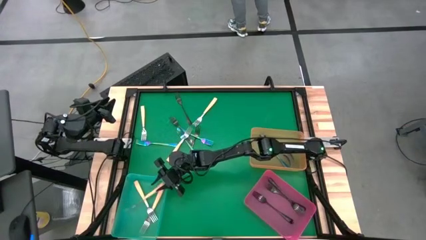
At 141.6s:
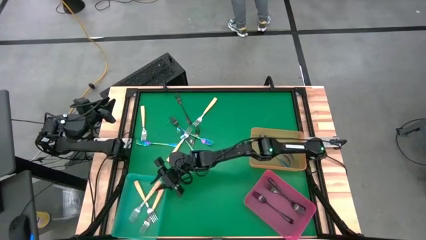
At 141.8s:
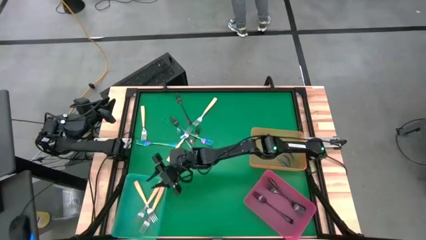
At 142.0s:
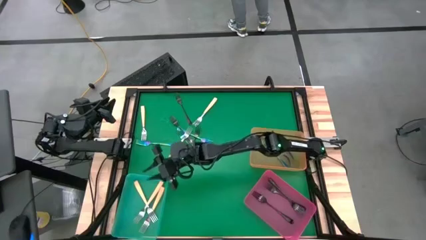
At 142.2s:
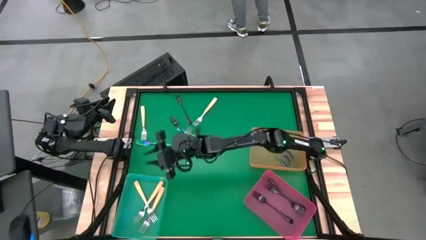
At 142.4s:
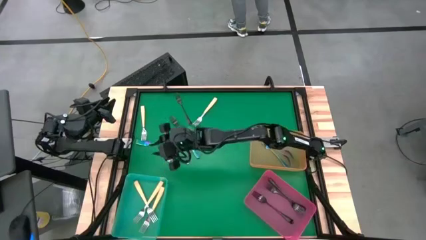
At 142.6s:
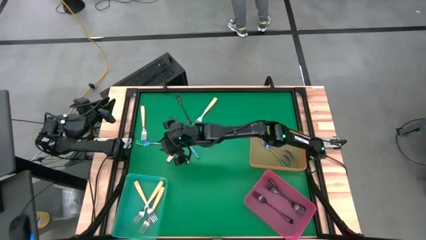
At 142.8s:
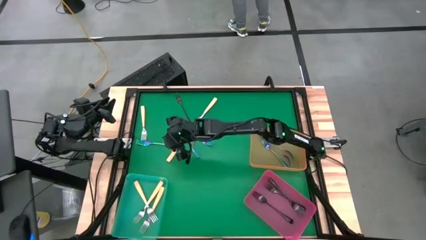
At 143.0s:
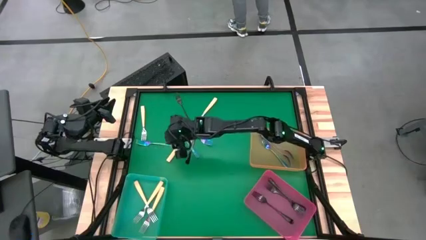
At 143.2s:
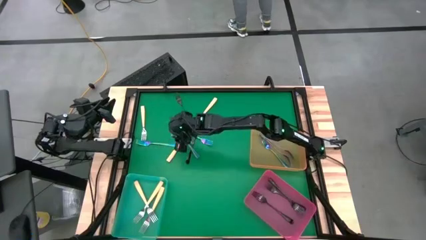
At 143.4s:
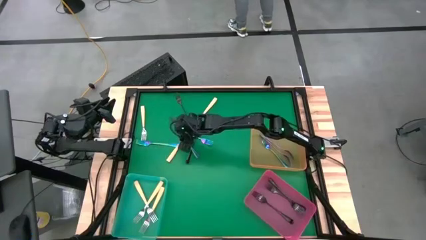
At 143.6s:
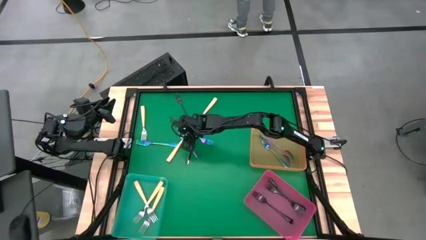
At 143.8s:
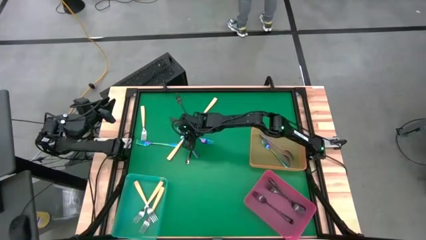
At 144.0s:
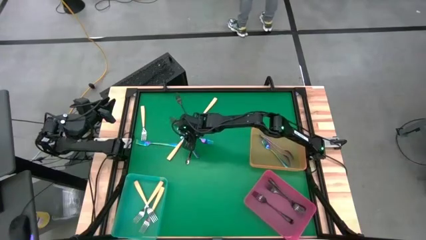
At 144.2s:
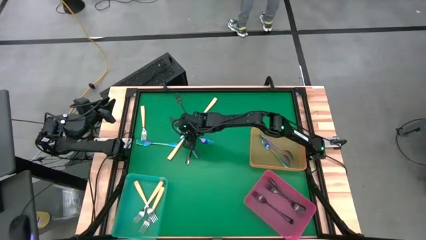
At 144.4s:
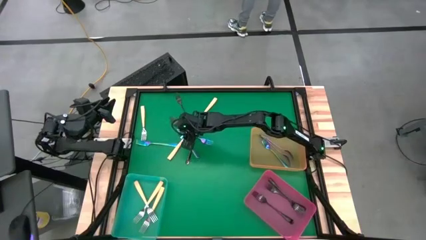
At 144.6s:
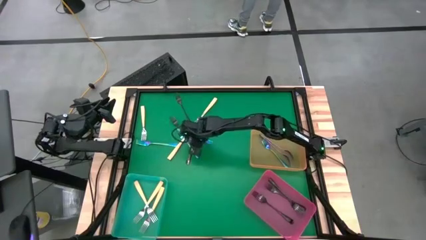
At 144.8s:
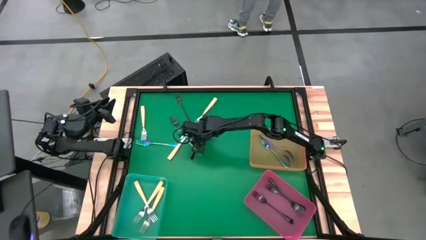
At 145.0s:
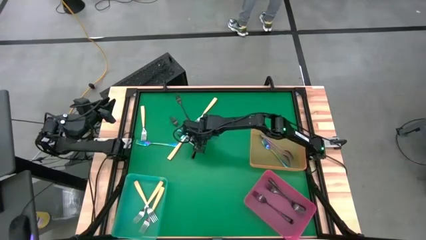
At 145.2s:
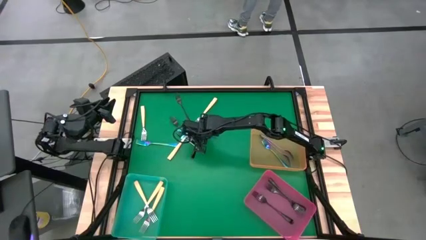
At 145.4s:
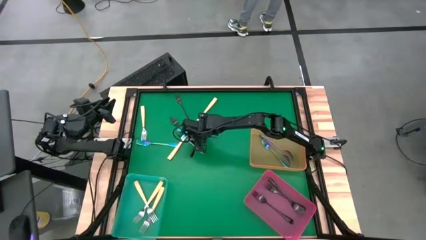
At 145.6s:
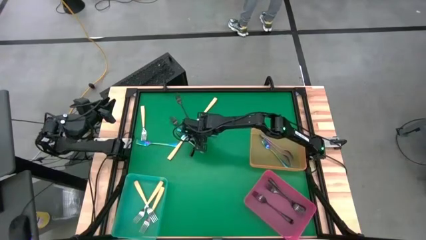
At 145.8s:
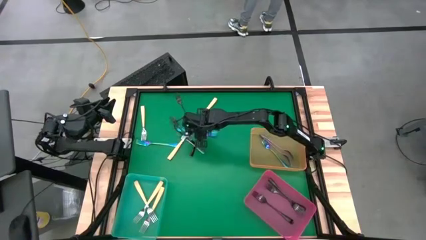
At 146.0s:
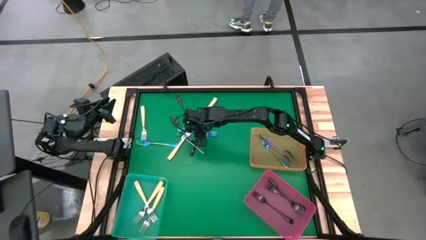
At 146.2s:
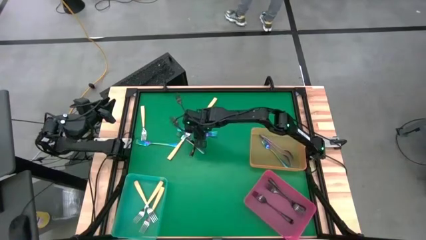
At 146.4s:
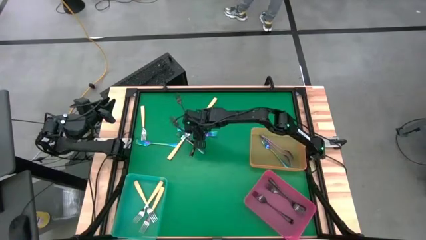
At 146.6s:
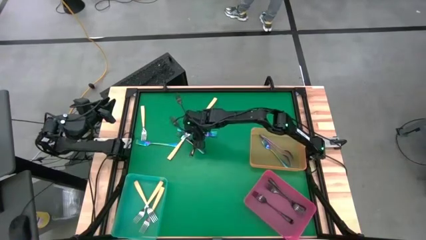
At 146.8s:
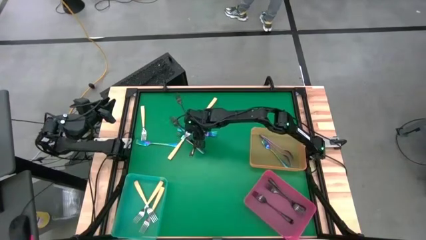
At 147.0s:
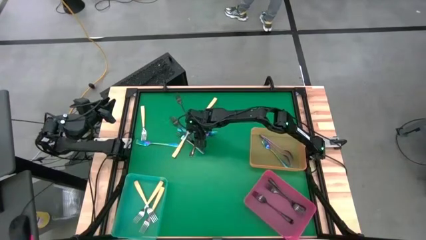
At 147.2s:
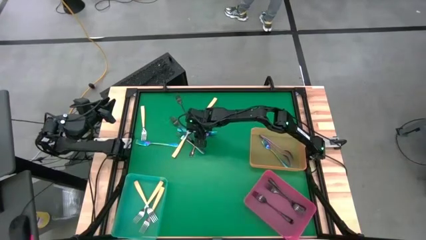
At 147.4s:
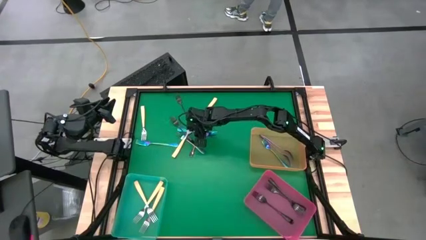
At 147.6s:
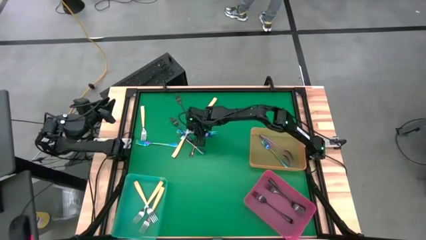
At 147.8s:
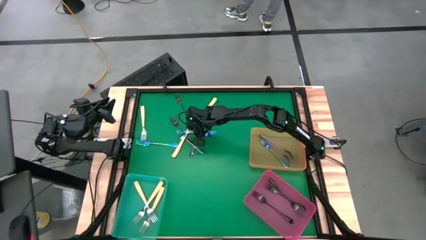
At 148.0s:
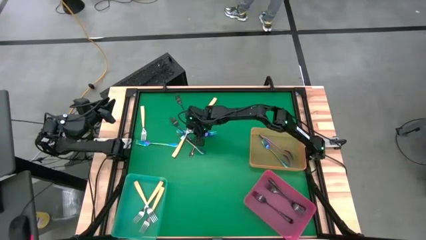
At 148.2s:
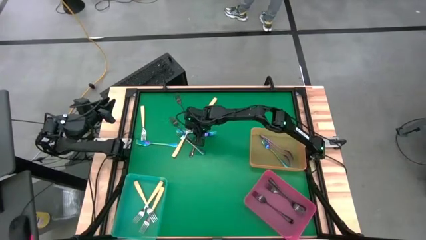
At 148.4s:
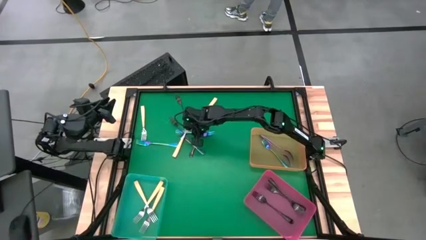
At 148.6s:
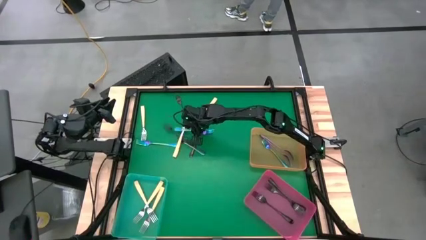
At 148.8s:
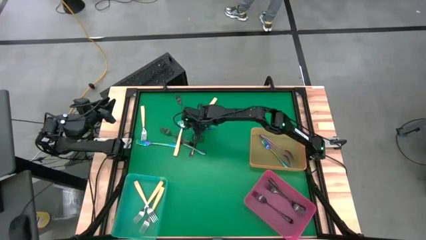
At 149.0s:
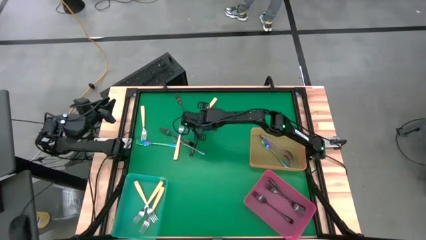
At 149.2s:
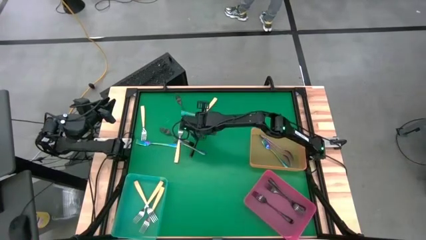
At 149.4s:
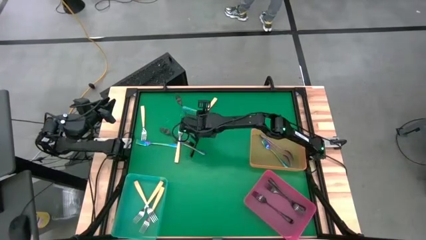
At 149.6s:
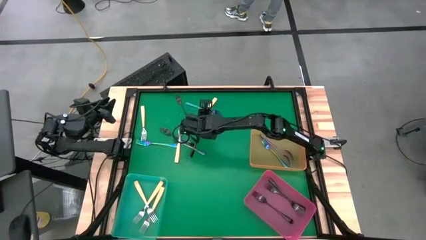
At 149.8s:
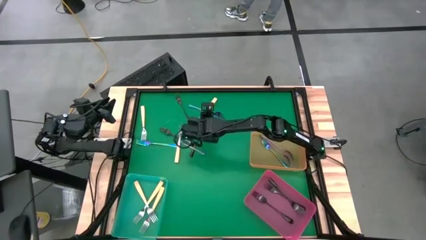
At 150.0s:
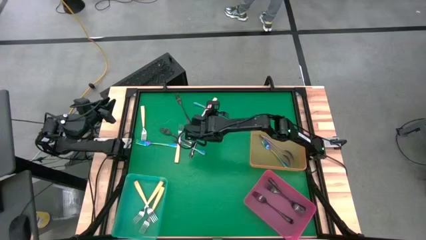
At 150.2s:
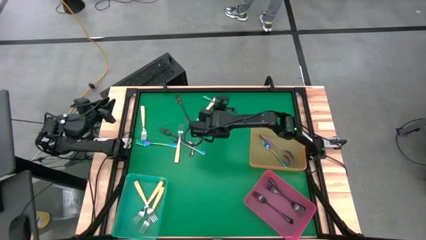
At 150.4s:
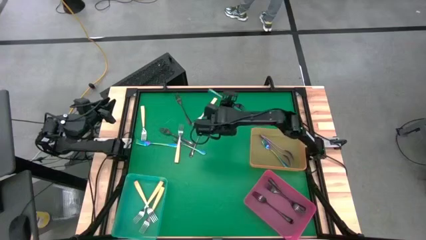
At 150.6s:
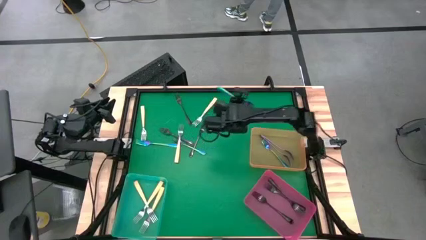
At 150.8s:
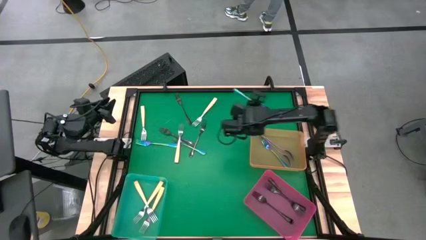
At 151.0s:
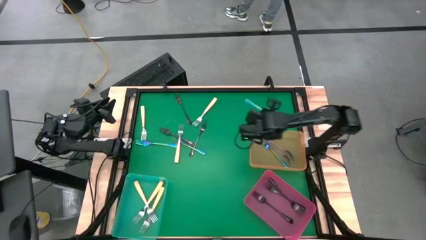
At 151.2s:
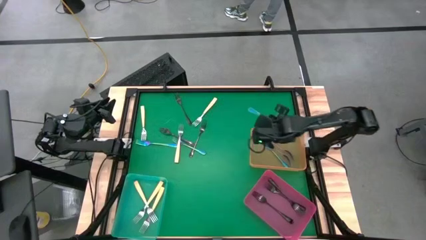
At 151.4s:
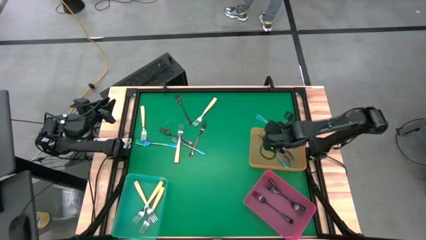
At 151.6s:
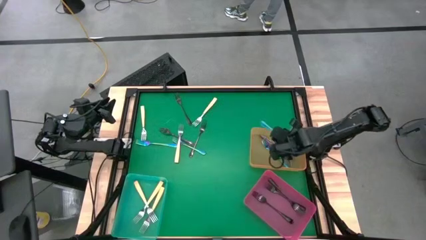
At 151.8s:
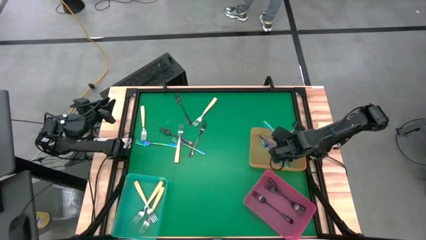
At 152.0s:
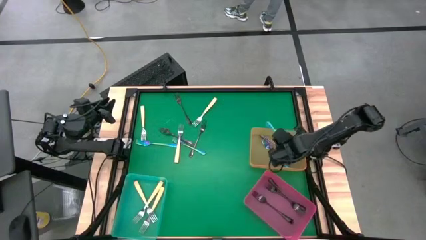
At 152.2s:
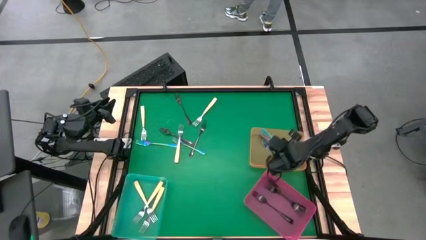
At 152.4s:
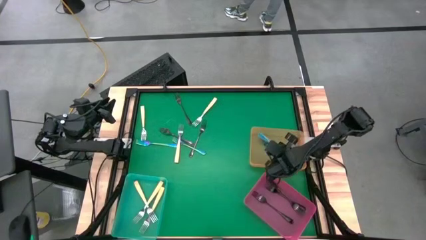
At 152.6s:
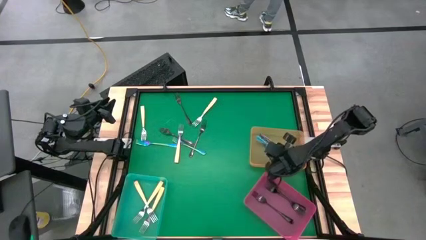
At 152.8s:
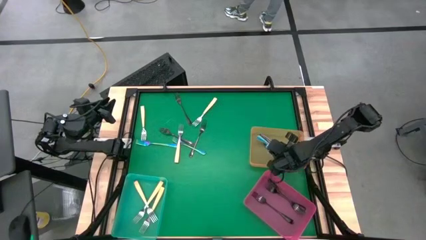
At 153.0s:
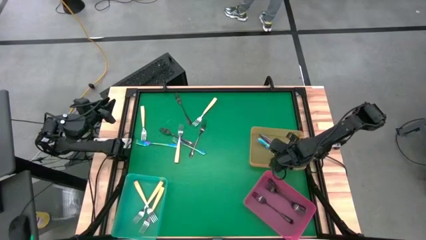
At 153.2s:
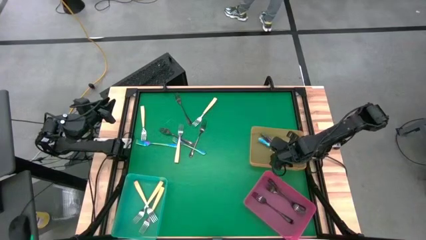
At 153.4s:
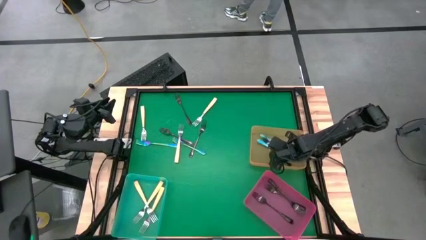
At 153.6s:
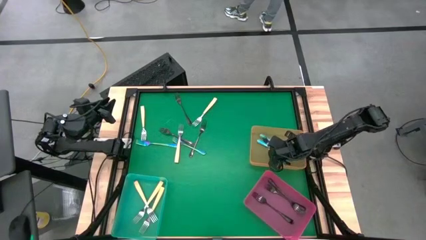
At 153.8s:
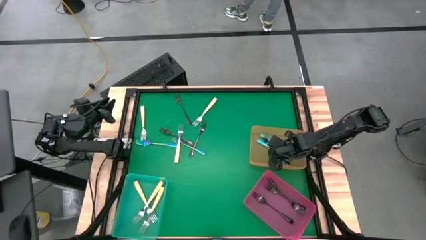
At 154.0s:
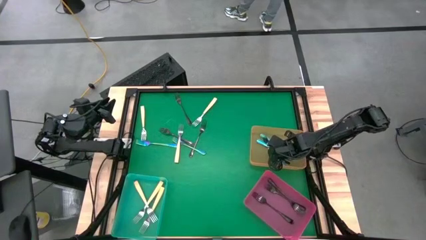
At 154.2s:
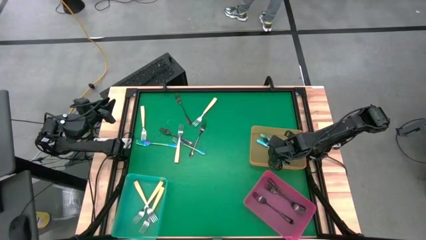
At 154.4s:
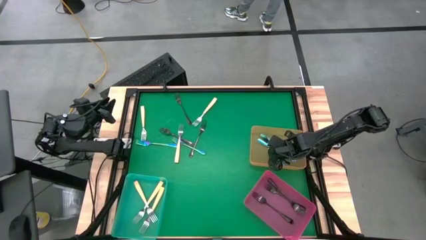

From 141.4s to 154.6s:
Task: Sort silverware by color (type)
Put the blue fork into the orange bin

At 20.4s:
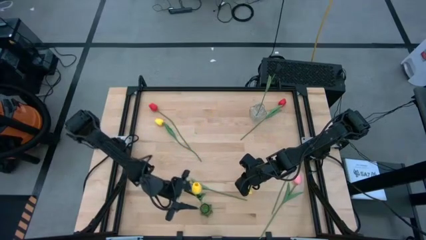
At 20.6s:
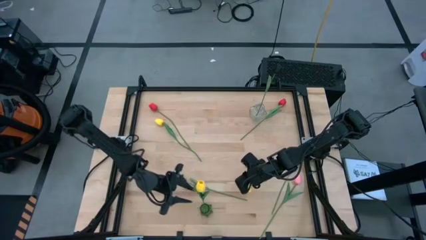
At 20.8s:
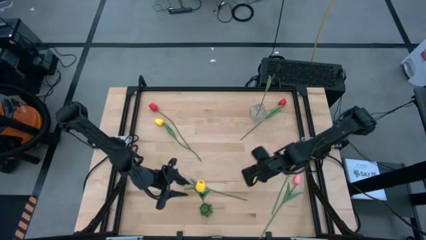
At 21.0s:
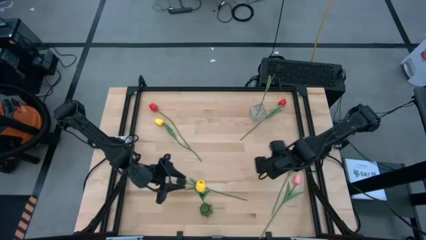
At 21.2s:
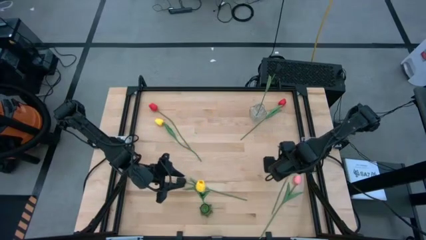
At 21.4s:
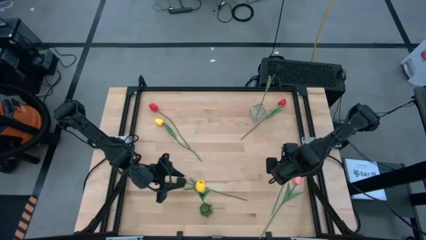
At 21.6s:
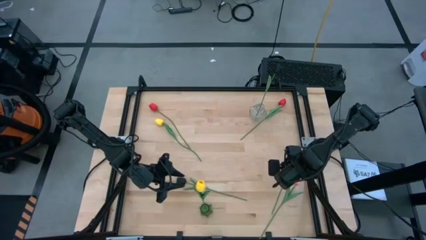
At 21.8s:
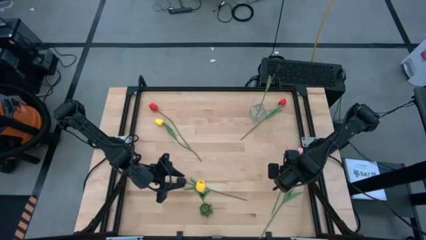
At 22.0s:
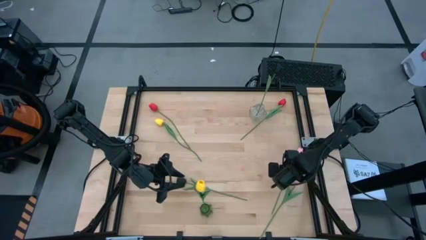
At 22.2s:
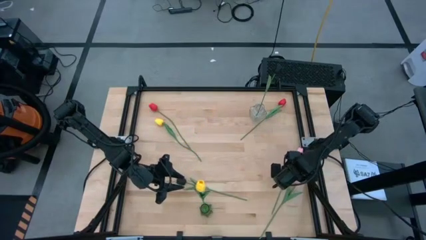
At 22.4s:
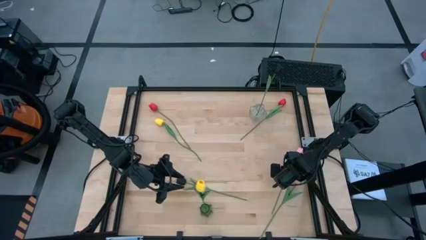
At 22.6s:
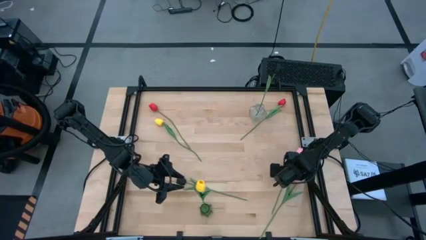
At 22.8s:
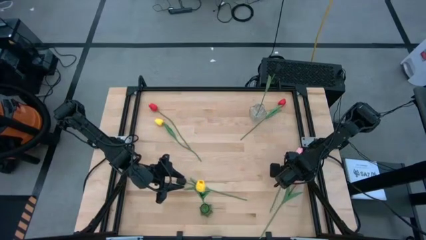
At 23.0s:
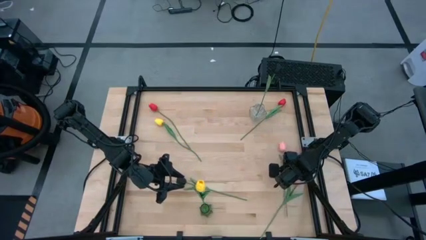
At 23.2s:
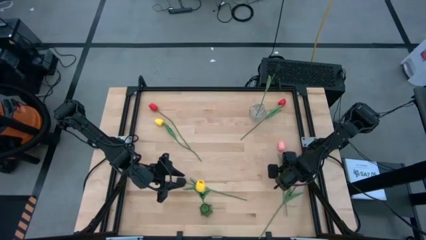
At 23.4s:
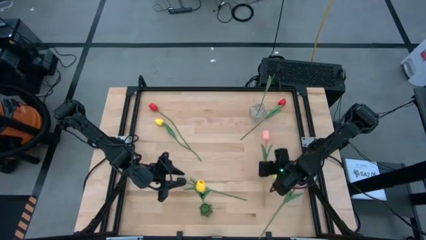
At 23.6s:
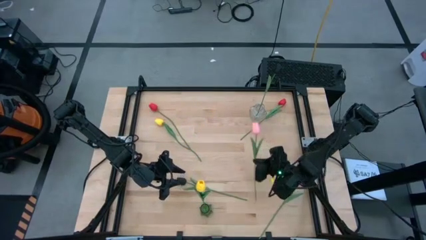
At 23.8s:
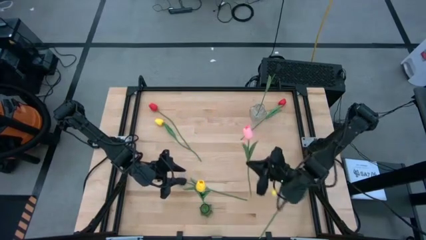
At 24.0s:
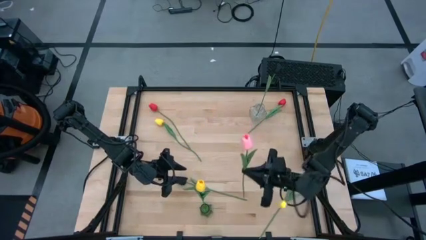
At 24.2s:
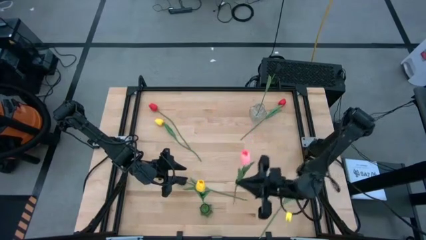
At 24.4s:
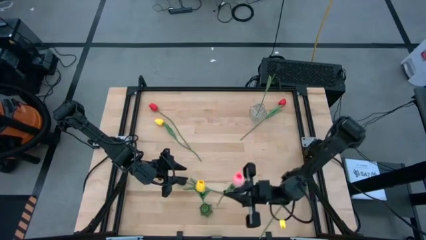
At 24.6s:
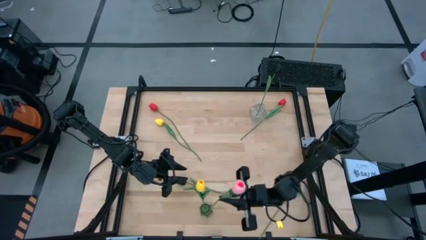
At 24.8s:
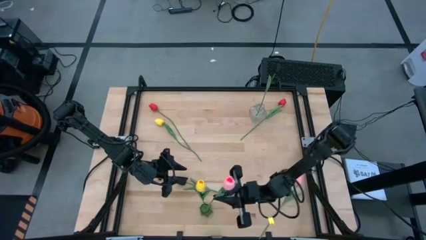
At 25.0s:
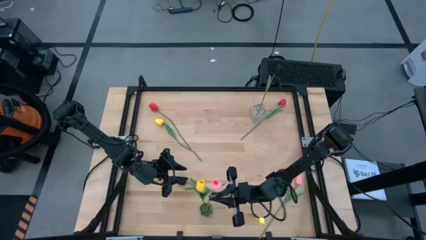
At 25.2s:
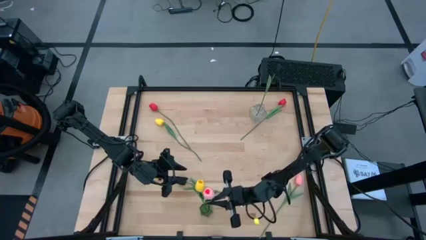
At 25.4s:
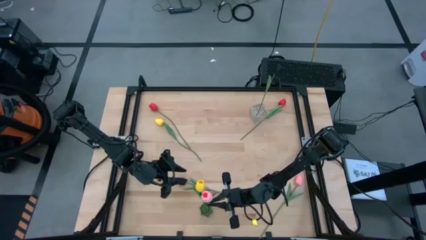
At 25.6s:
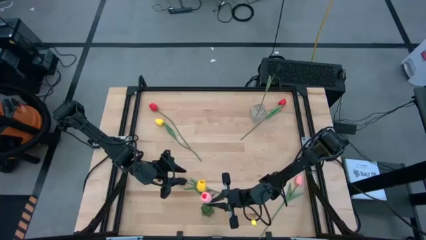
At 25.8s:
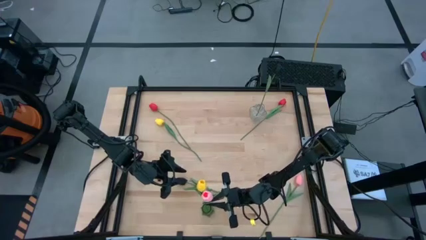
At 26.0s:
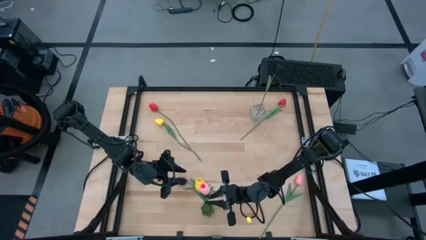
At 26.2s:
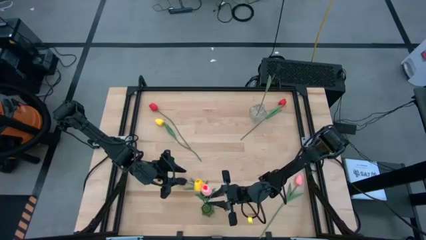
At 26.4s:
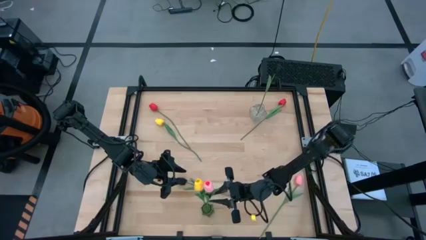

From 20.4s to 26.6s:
Task: Sort flowers into vase by color
Put the top pink flower into the green vase
